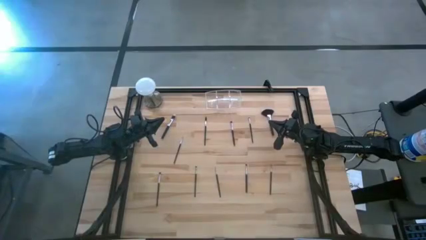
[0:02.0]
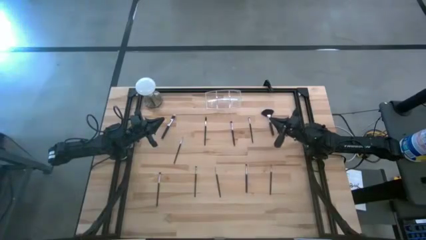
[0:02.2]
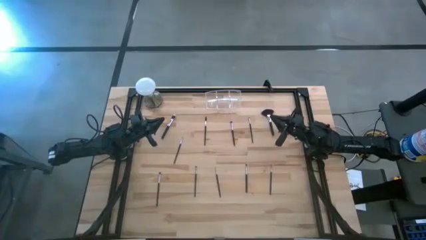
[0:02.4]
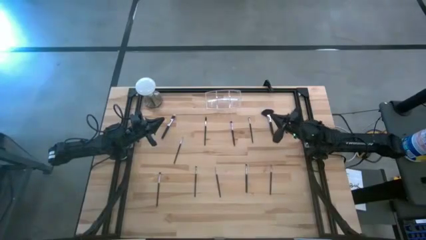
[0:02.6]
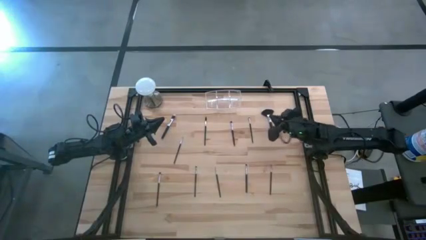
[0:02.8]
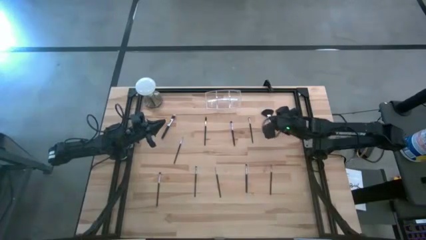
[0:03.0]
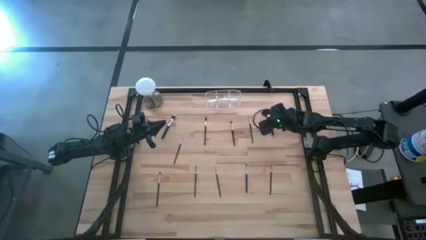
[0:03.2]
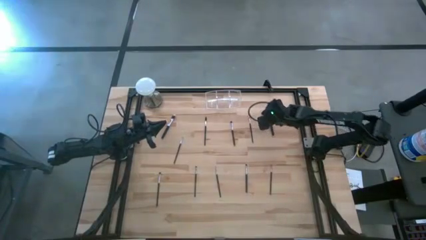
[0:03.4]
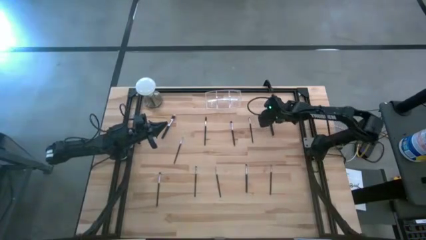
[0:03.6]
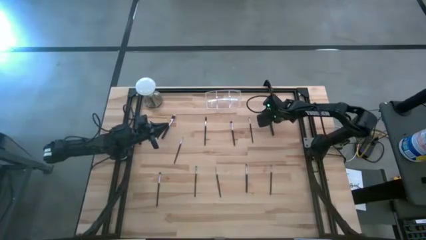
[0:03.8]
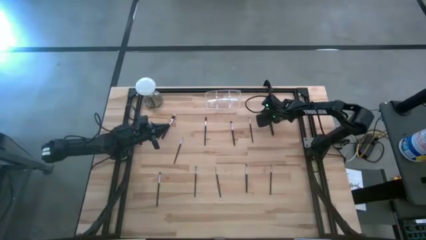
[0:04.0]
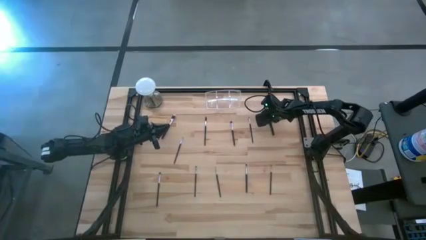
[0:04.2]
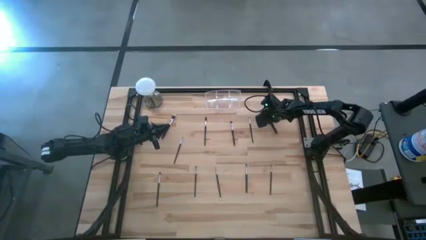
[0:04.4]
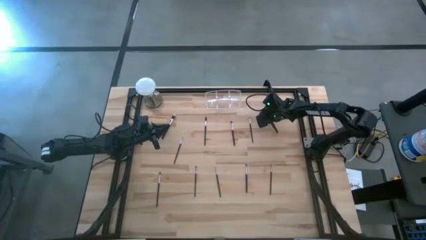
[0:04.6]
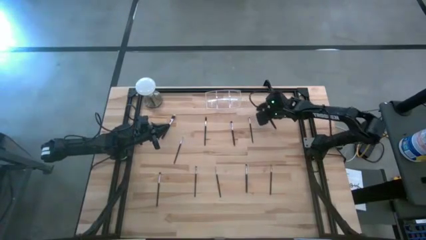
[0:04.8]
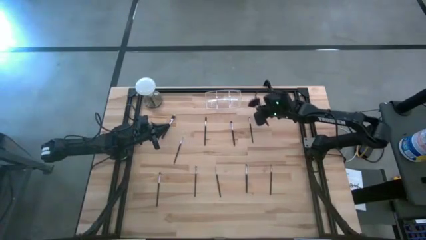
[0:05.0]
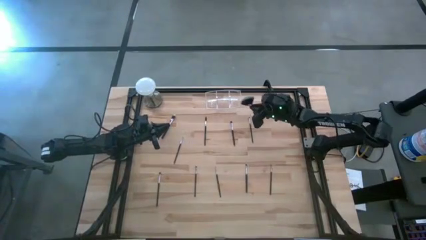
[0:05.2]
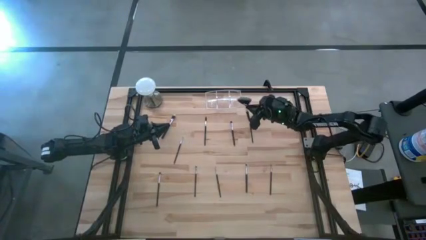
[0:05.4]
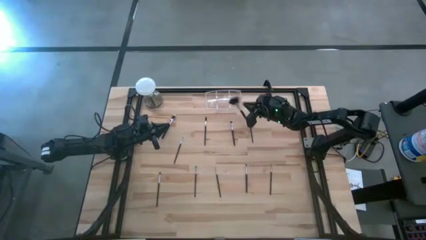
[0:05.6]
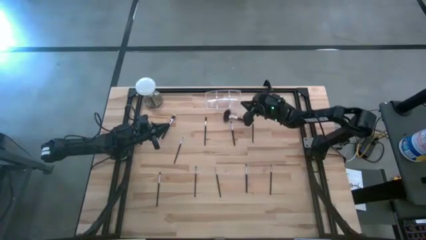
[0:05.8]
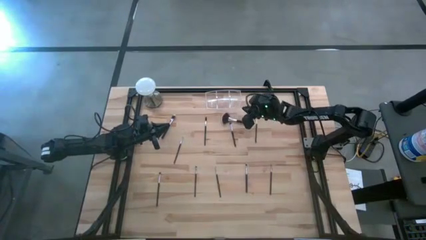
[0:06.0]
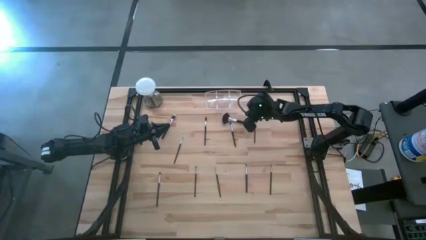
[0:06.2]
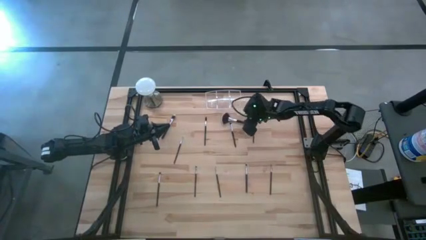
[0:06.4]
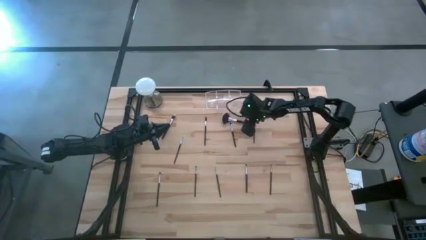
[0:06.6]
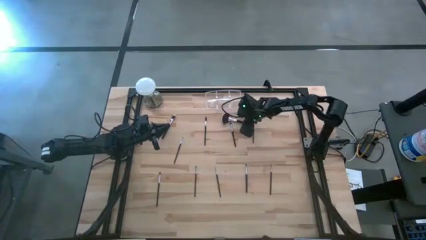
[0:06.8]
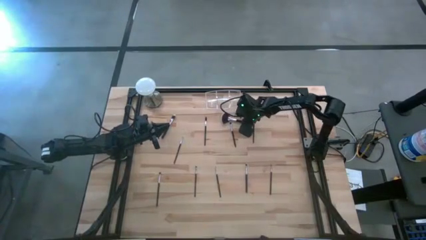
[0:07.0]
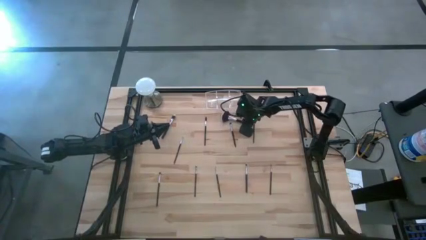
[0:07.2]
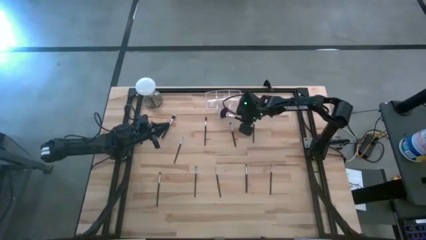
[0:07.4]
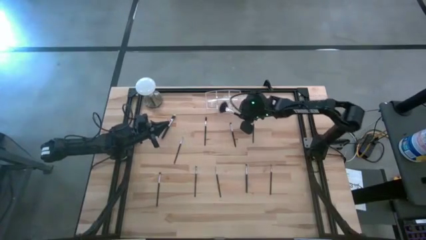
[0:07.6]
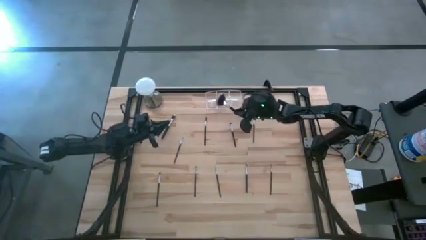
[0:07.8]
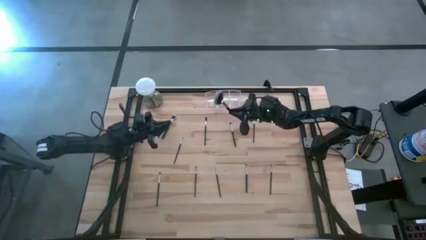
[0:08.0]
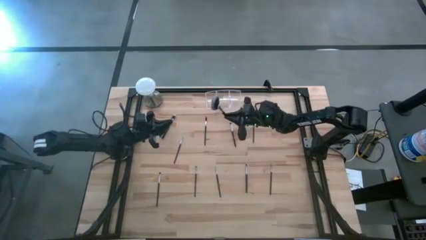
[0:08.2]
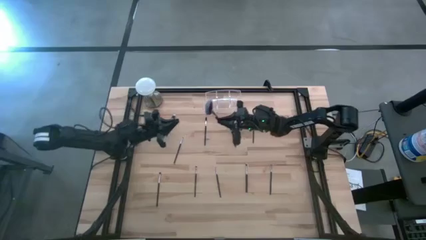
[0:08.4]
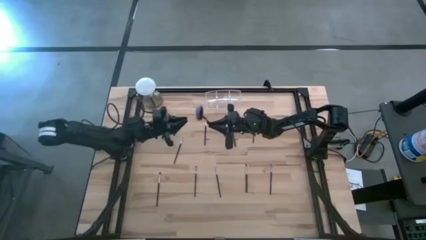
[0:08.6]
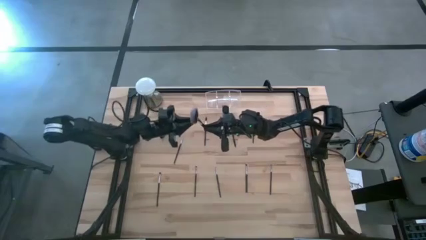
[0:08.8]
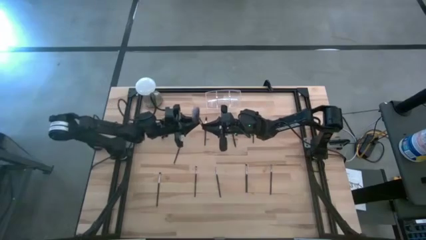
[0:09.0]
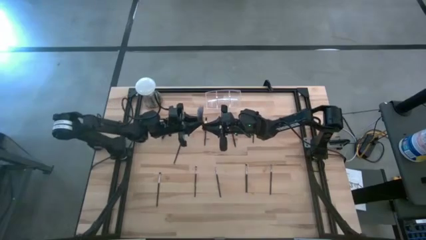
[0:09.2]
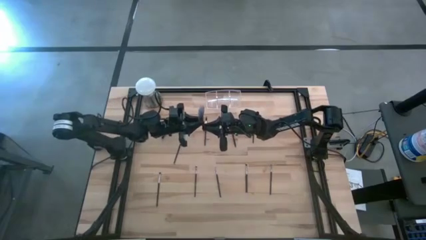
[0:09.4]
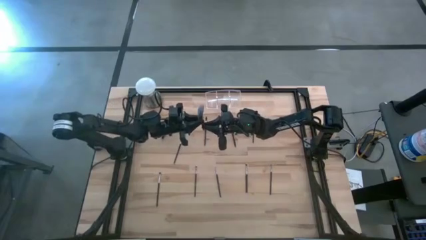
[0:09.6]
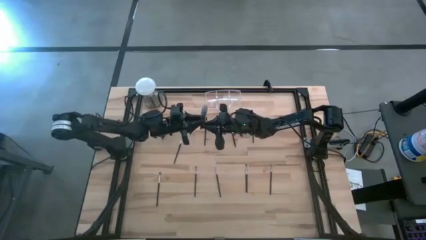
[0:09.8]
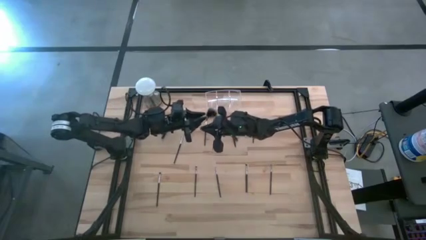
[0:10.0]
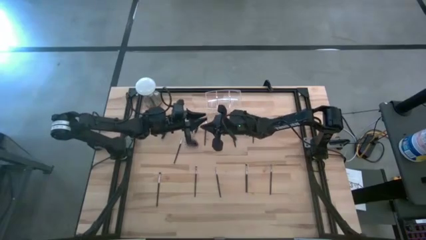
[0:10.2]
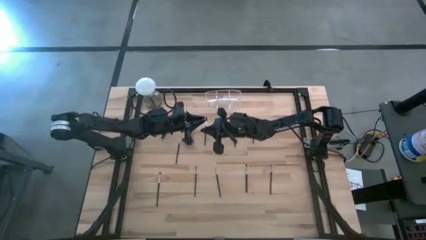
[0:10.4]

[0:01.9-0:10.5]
Task: Pick & Place Makeup Brushes
Put the black highlighter brush into the transparent organizer

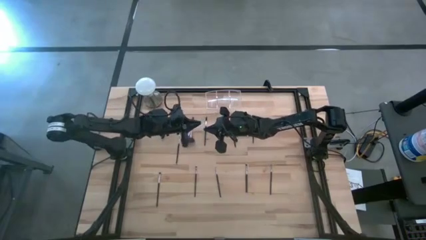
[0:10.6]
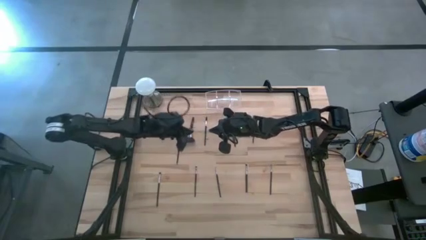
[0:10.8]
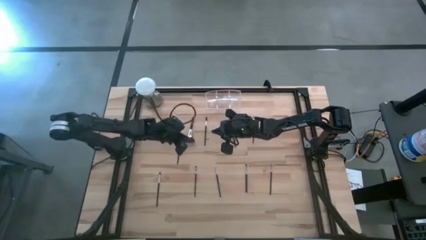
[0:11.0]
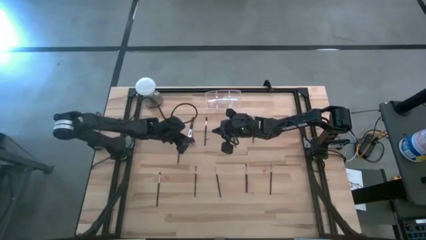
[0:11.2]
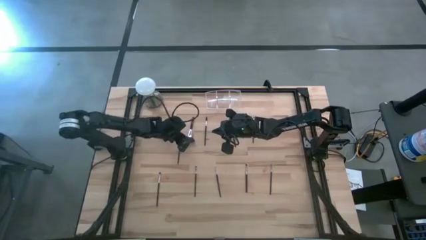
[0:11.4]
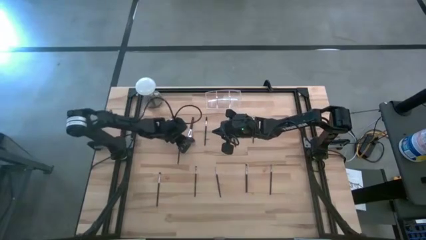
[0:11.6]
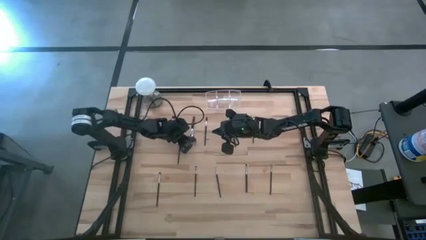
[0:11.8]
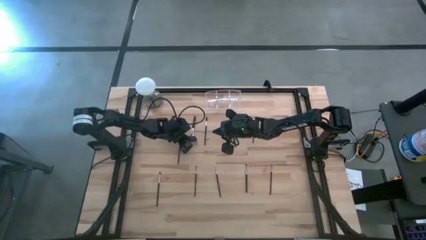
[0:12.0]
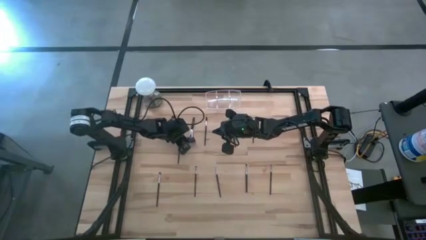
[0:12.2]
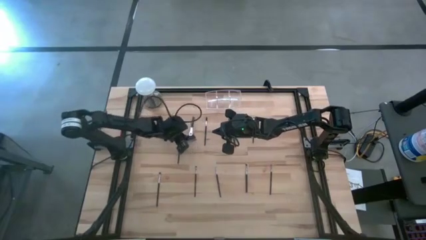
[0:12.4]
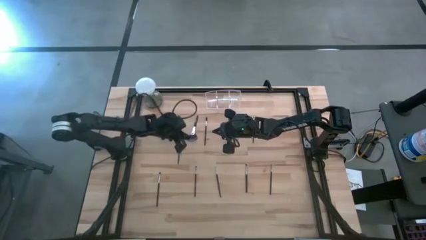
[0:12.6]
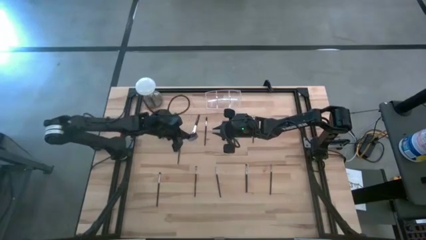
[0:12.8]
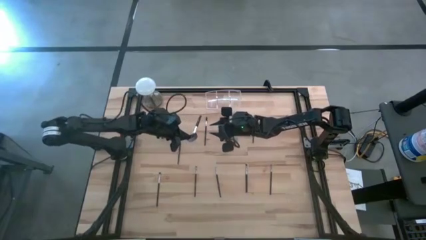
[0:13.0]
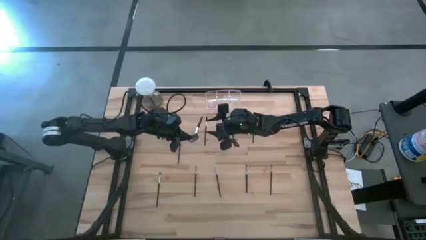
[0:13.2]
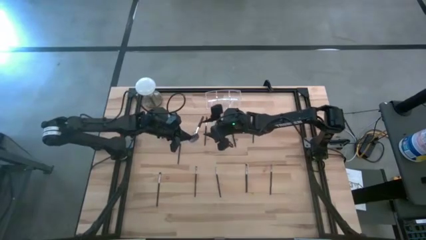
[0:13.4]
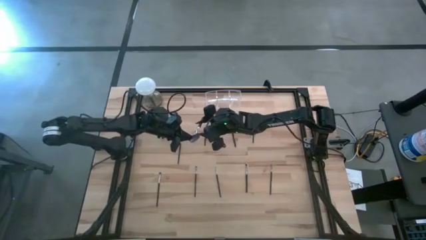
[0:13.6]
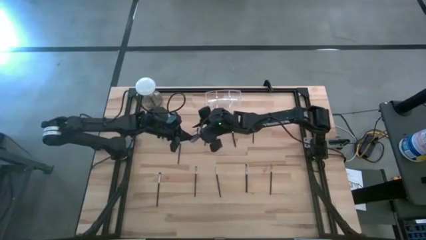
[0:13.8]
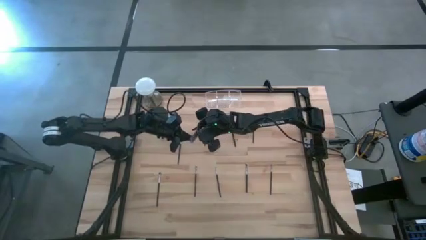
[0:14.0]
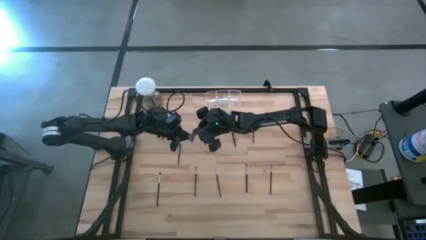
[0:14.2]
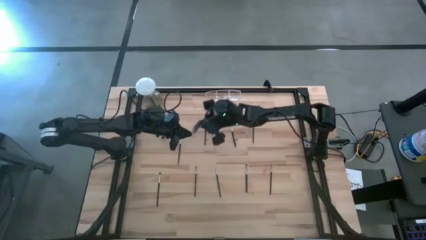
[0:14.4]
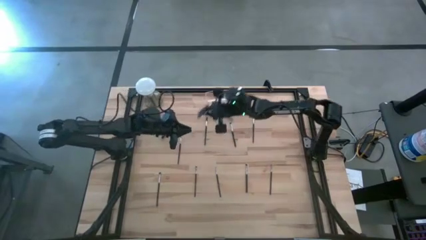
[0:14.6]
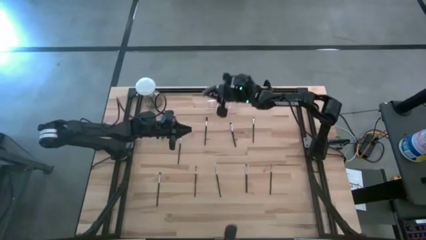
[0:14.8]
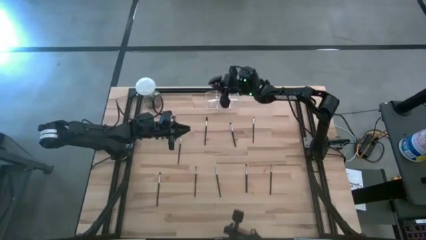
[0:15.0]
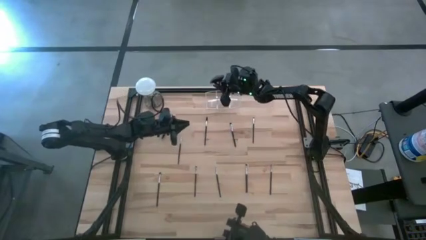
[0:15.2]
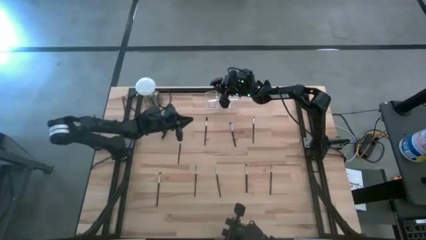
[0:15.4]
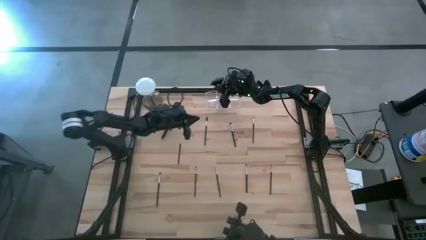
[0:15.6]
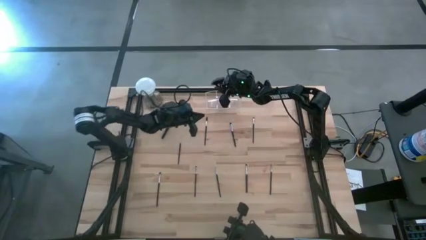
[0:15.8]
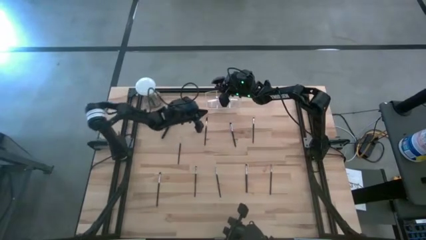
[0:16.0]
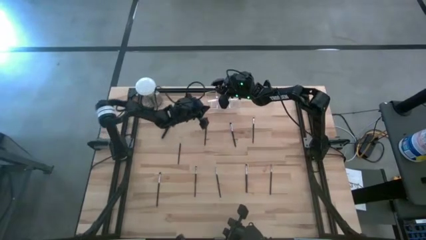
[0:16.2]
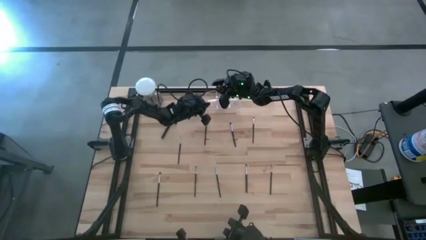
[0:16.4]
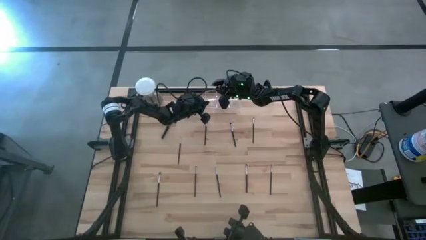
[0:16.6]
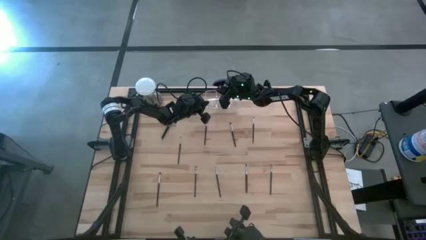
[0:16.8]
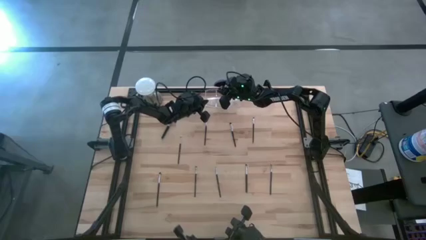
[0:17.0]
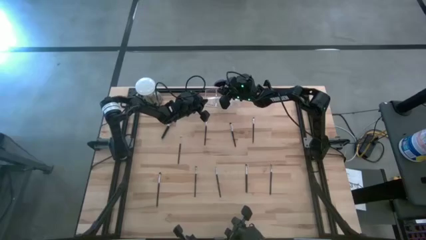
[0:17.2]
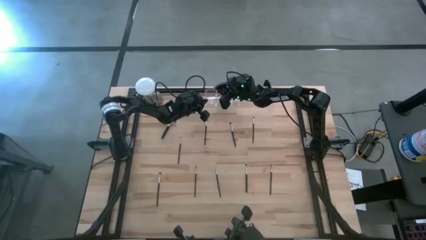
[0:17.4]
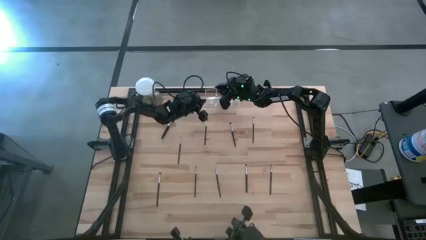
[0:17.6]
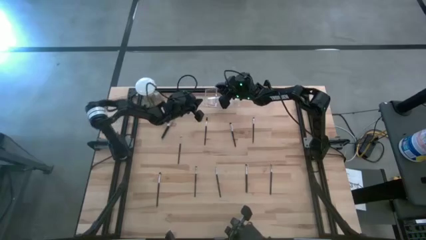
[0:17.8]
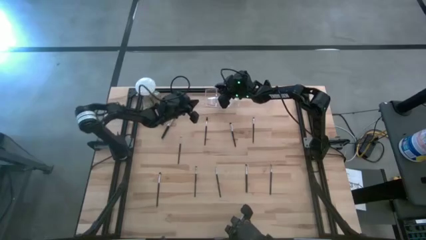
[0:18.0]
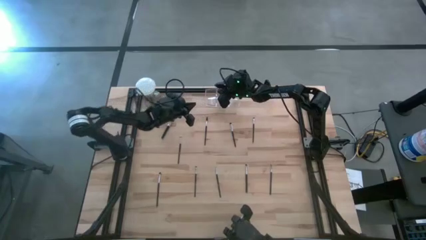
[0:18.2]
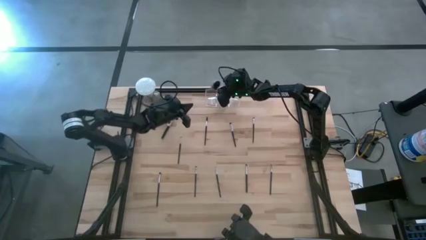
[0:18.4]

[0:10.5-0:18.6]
Put the black highlighter brush into the transparent organizer
